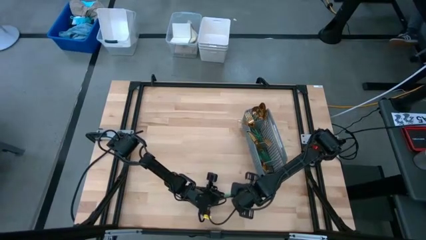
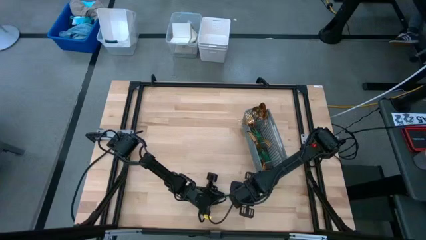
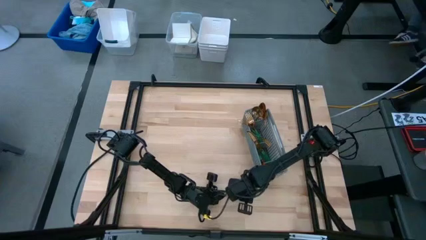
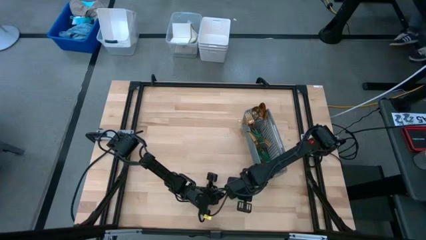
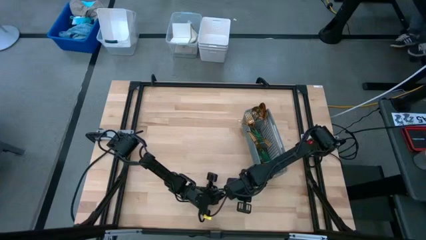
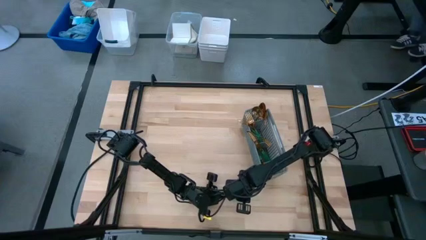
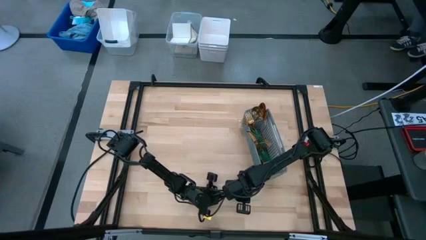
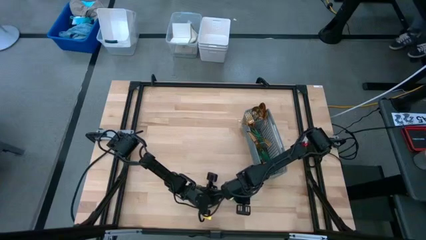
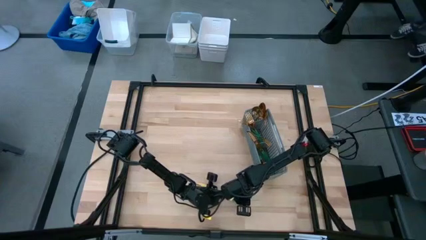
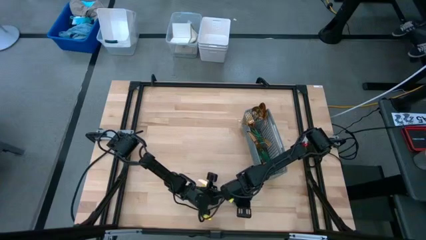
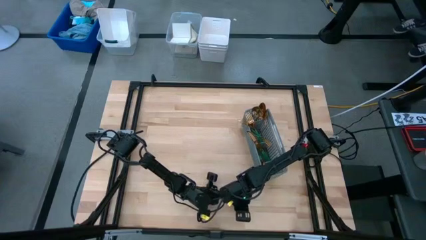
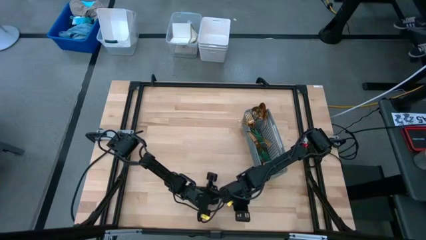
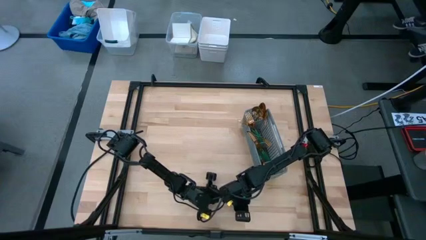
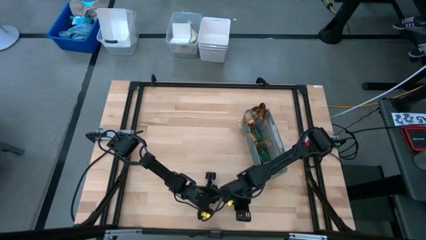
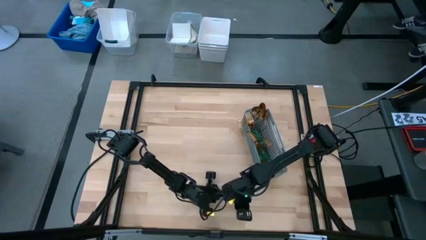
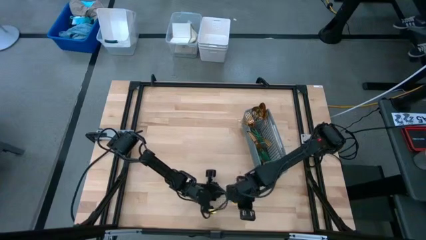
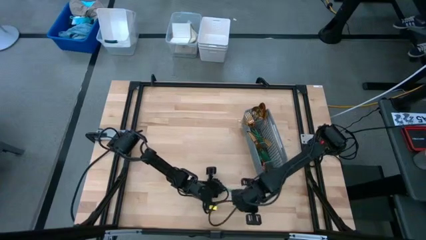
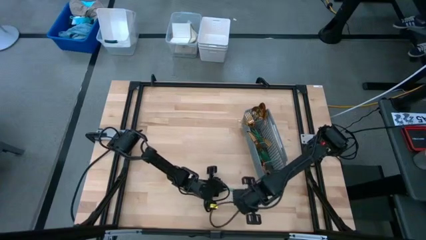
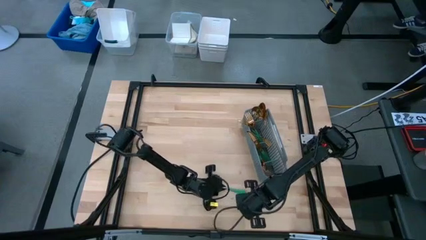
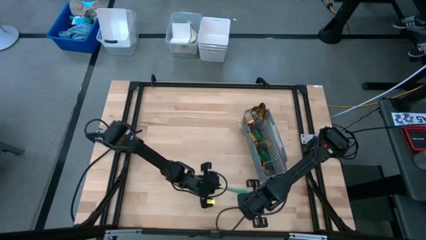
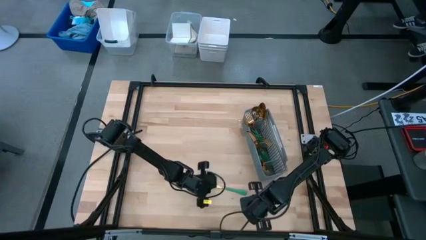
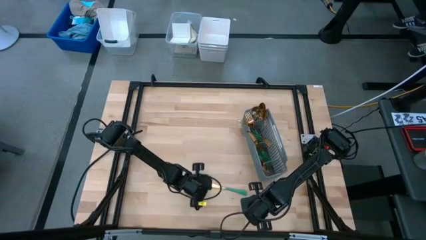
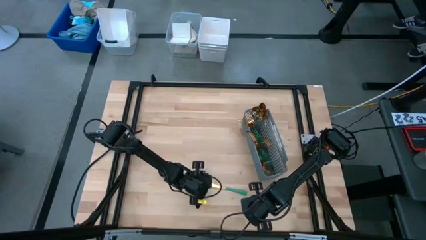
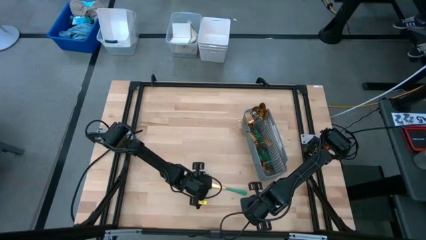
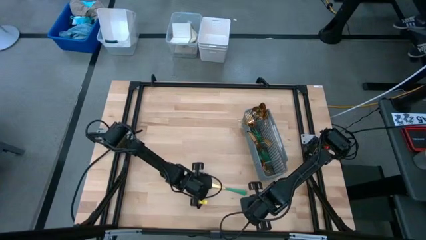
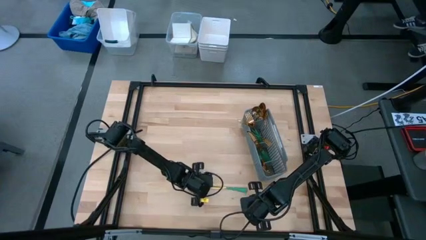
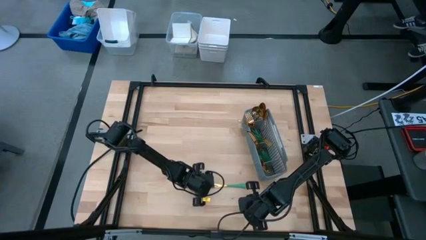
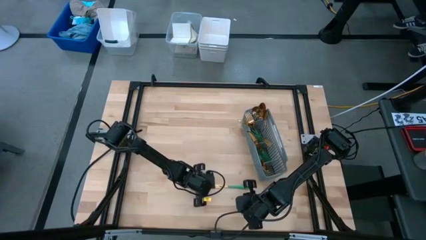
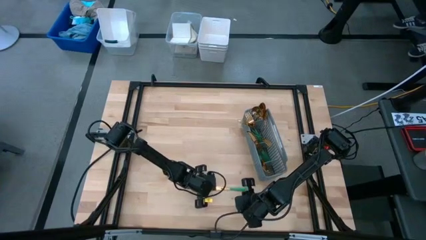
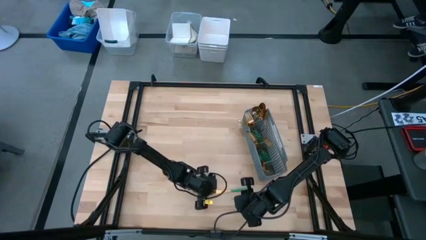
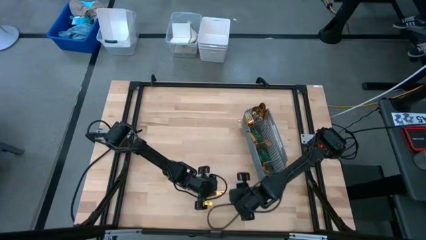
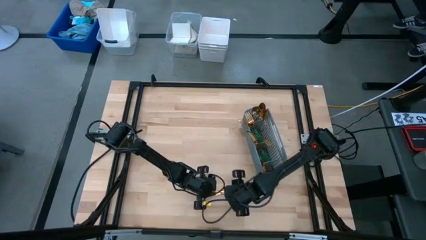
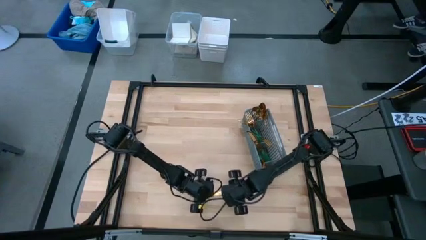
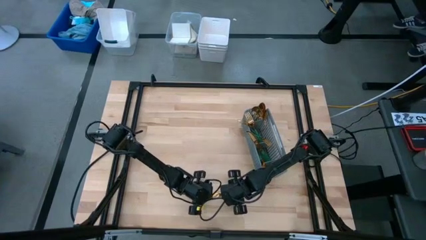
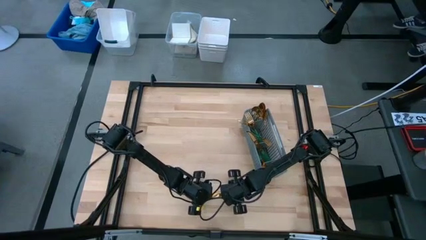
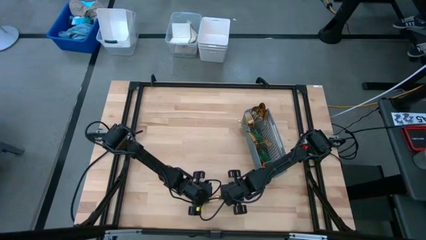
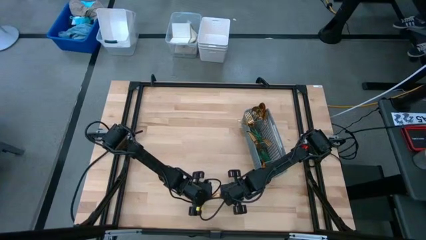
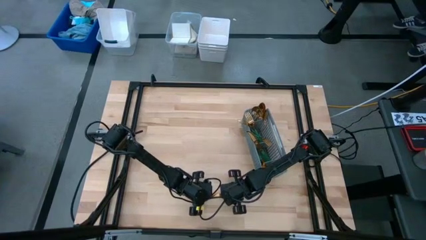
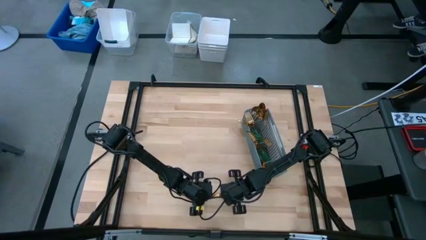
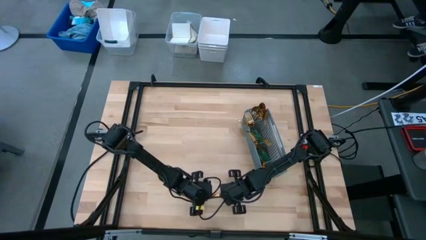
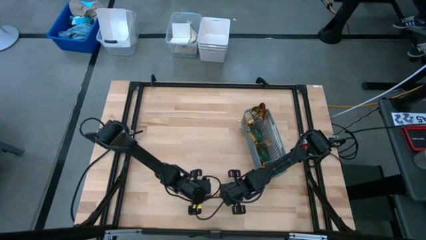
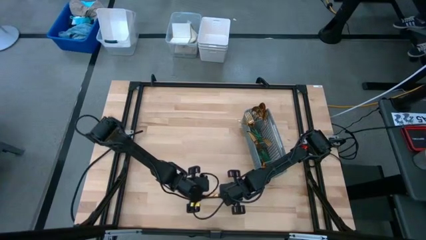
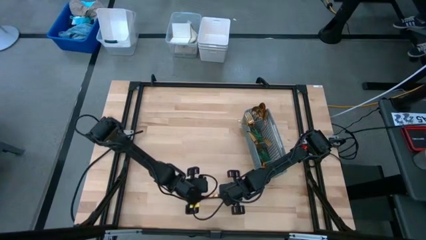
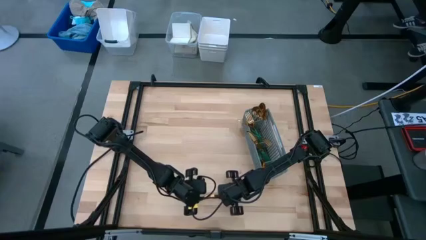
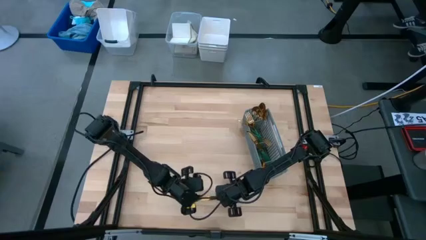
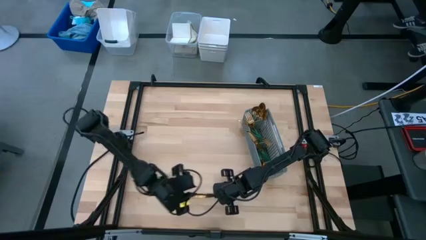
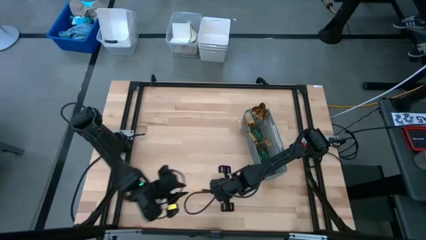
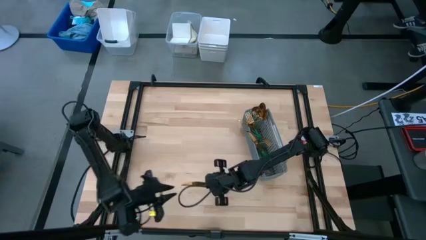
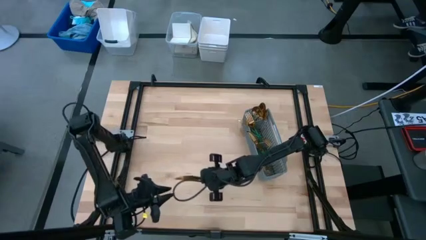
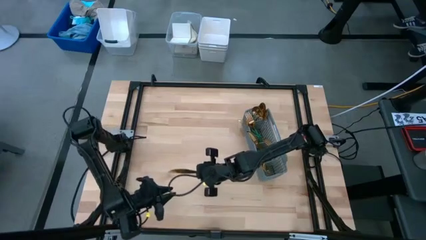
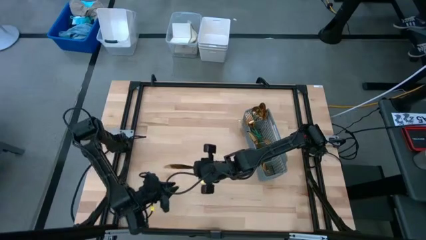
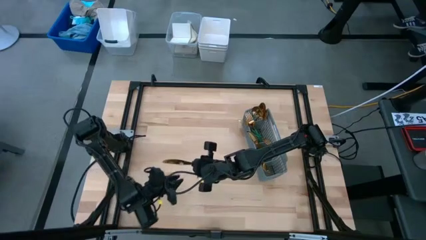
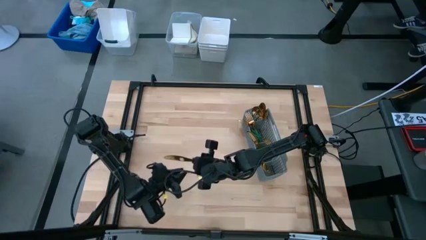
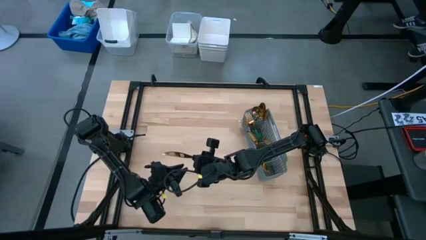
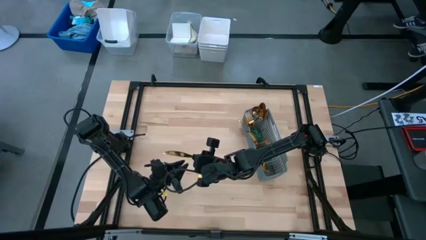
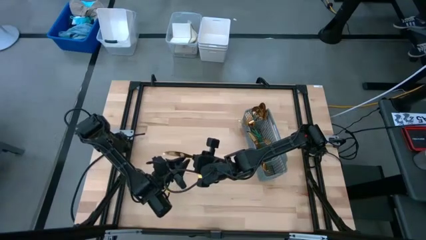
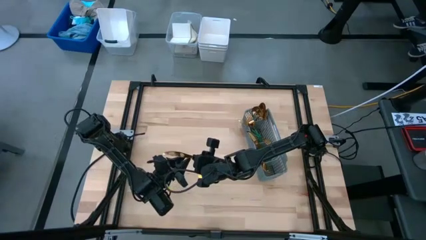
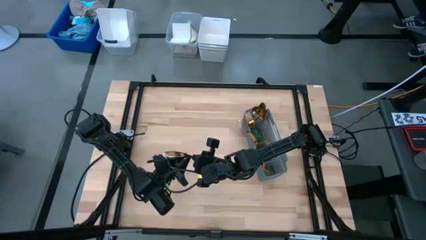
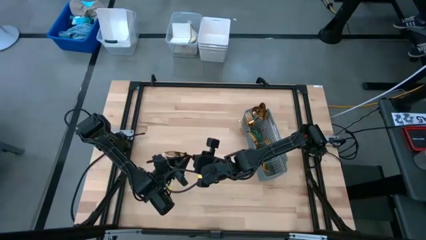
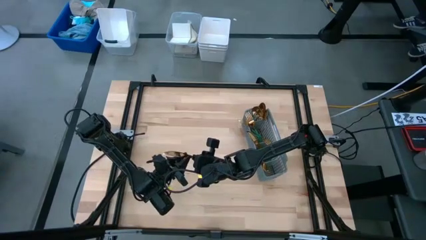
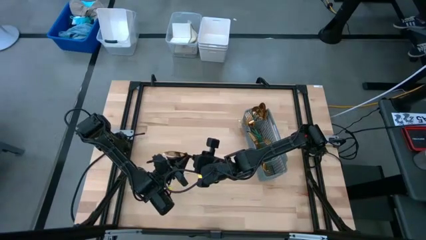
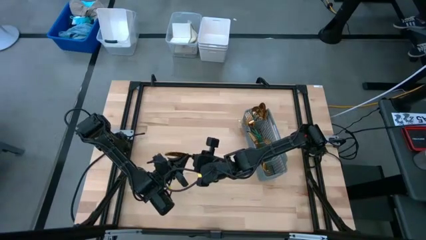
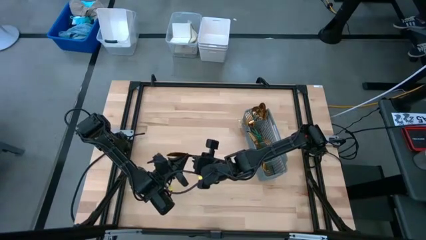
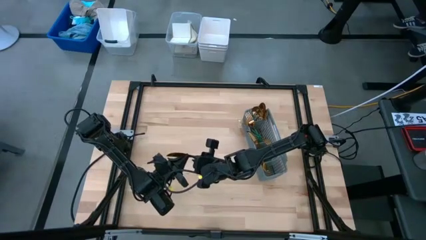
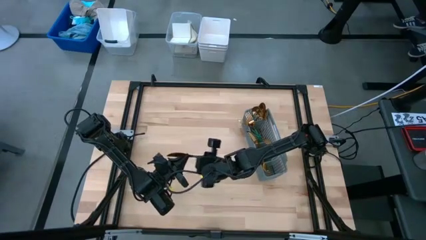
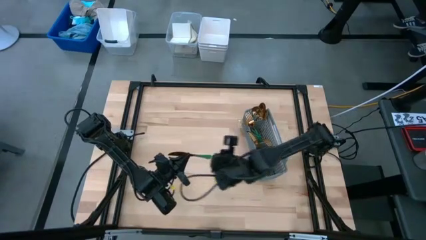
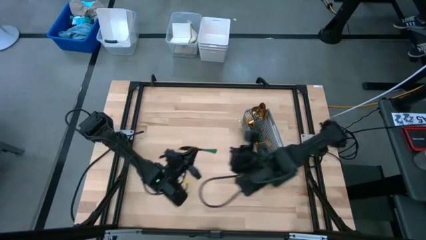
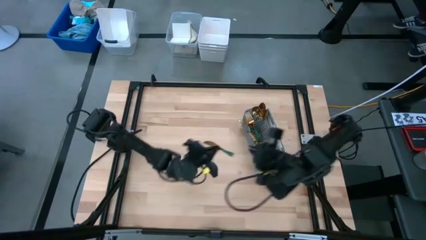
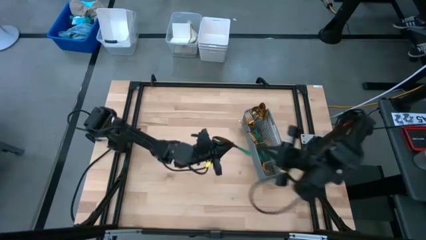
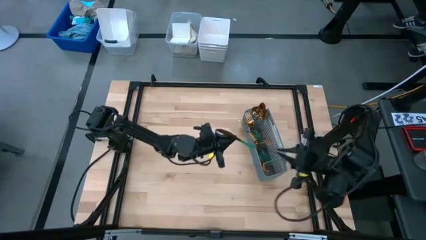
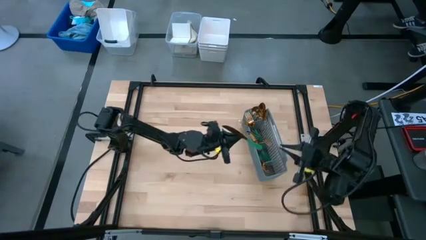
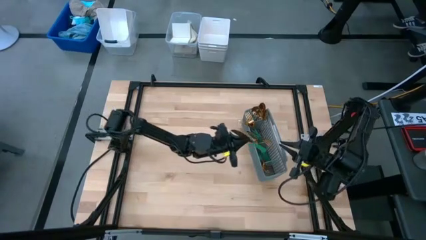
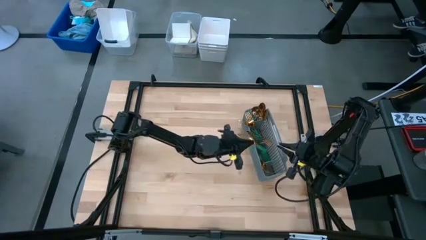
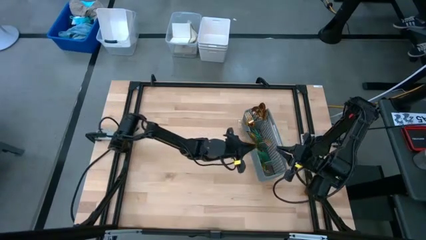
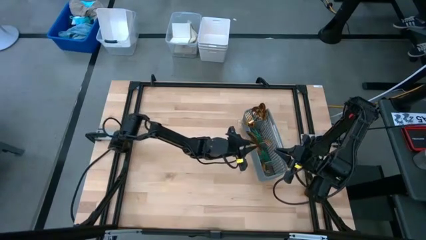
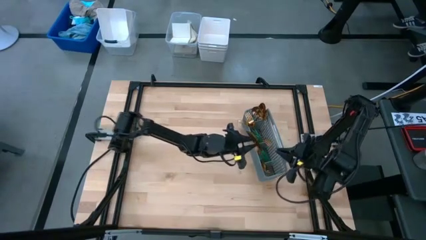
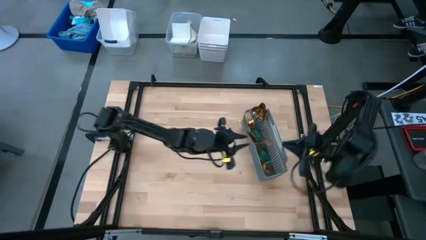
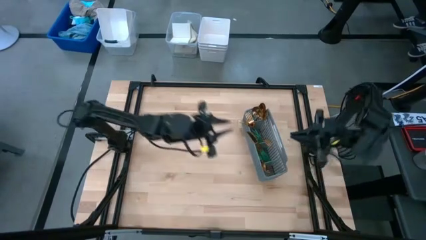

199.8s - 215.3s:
Task: Sort silverware
Put the knife into the bottom section of the basket
